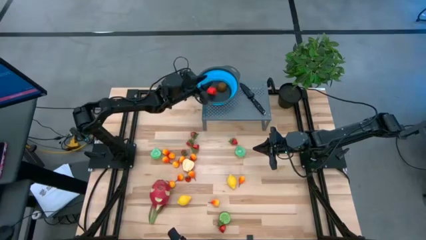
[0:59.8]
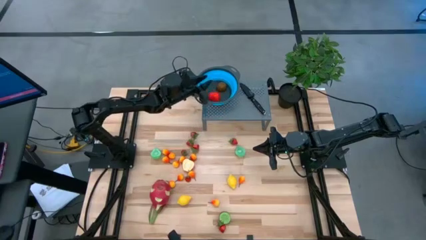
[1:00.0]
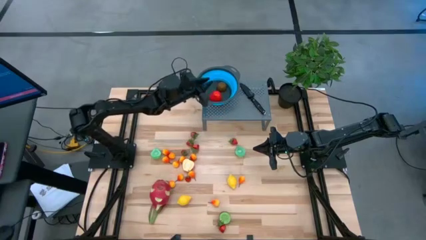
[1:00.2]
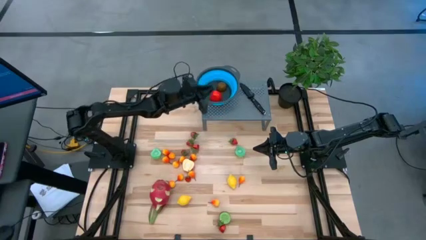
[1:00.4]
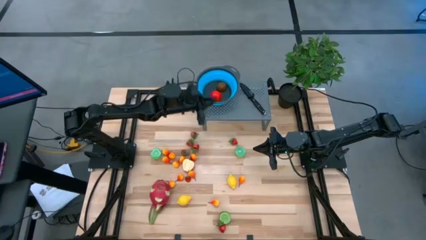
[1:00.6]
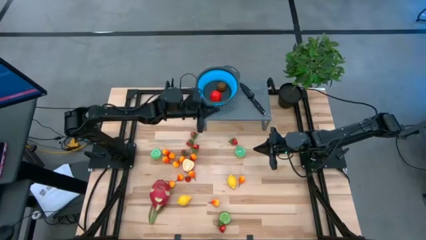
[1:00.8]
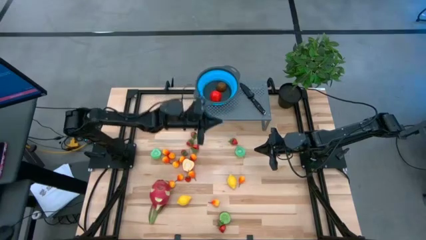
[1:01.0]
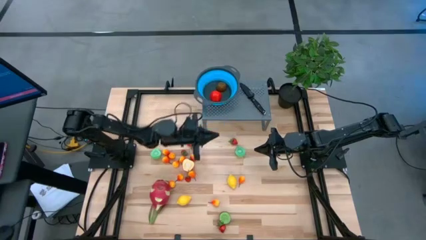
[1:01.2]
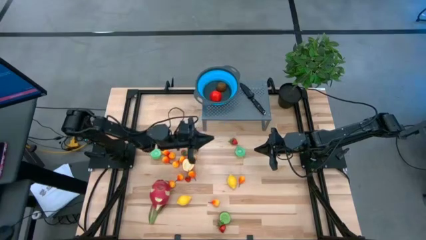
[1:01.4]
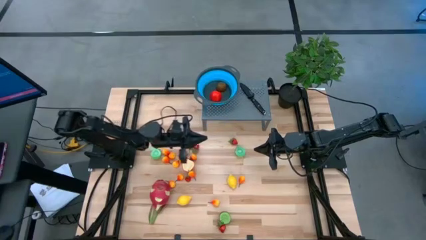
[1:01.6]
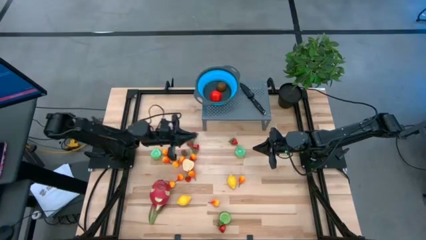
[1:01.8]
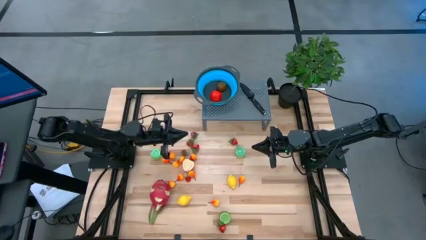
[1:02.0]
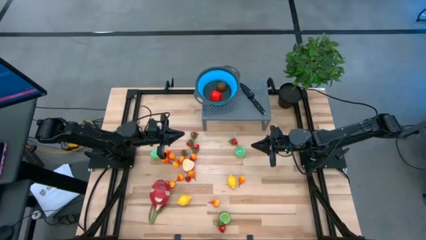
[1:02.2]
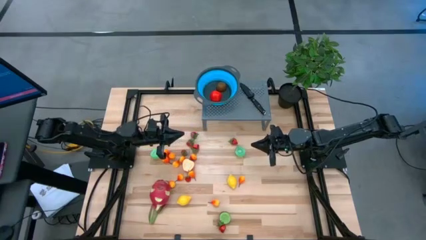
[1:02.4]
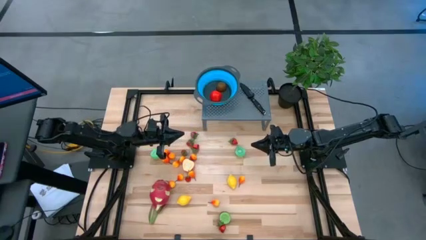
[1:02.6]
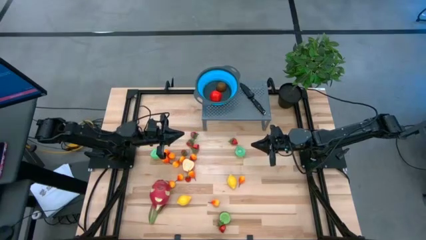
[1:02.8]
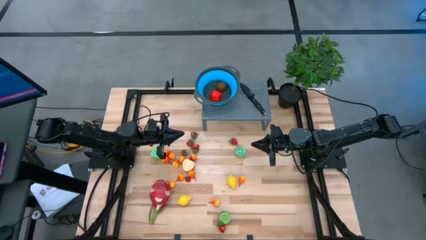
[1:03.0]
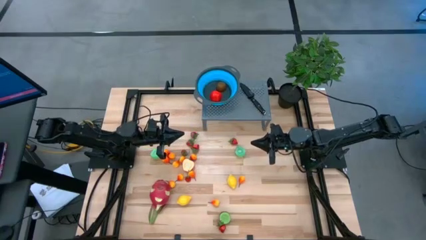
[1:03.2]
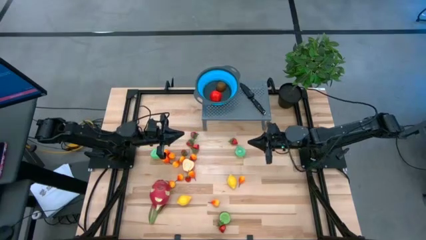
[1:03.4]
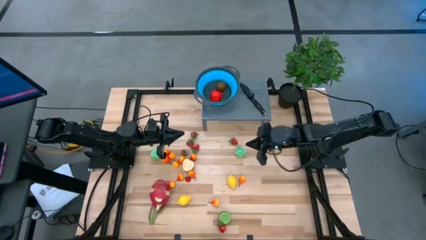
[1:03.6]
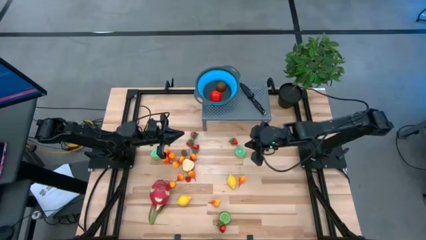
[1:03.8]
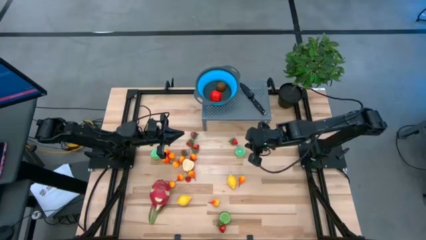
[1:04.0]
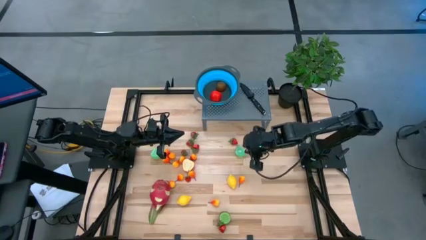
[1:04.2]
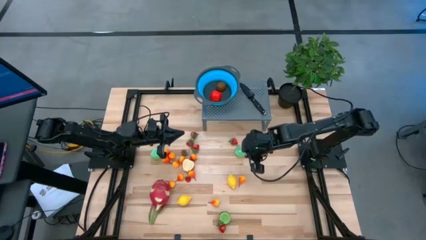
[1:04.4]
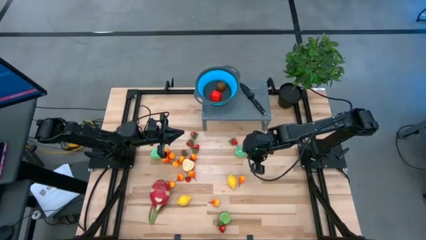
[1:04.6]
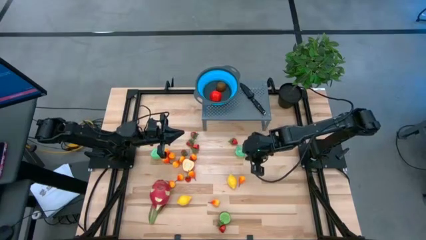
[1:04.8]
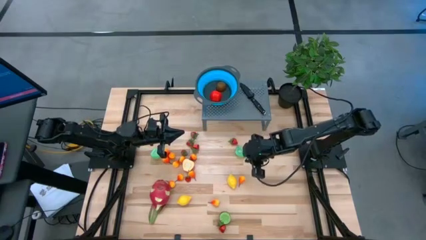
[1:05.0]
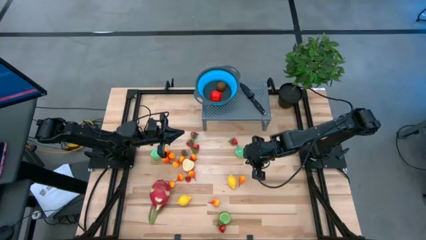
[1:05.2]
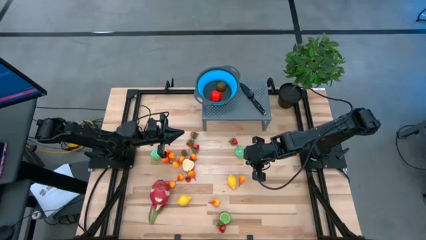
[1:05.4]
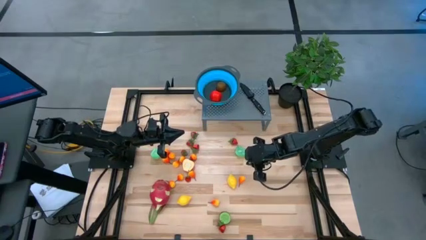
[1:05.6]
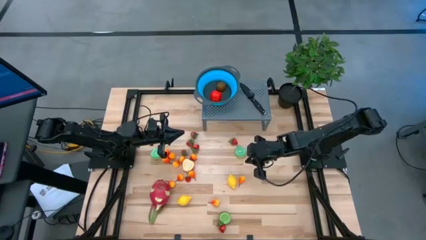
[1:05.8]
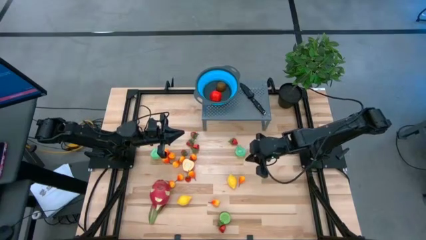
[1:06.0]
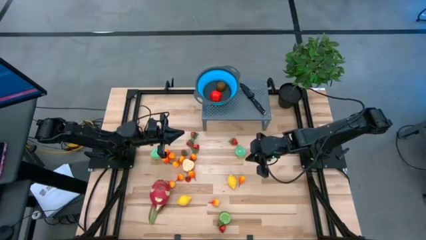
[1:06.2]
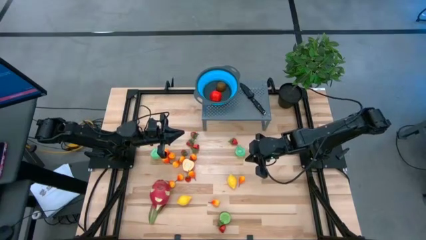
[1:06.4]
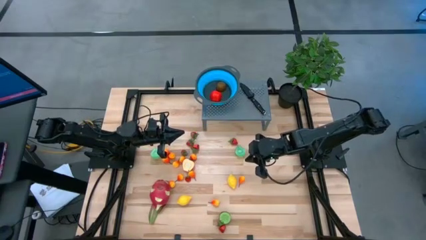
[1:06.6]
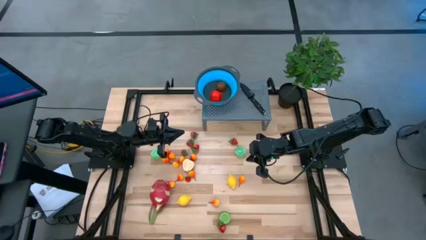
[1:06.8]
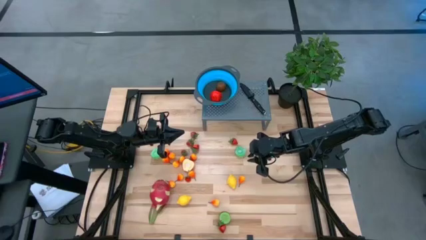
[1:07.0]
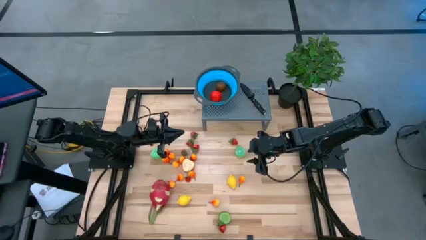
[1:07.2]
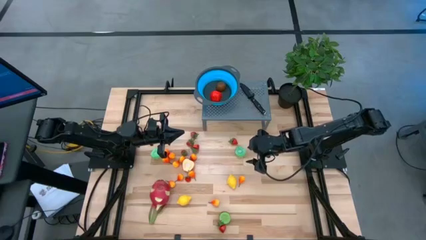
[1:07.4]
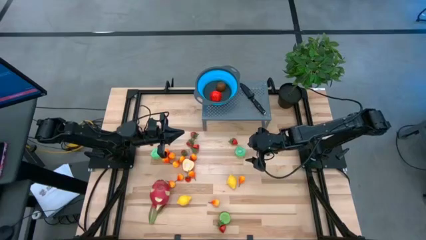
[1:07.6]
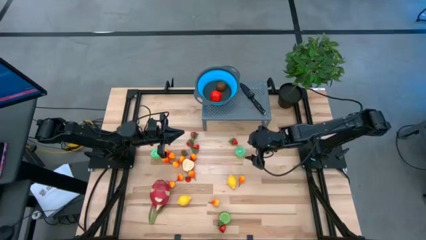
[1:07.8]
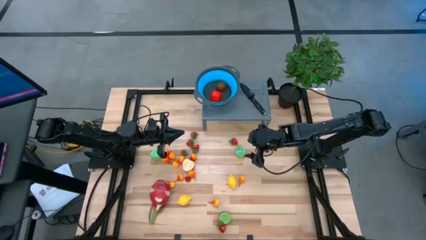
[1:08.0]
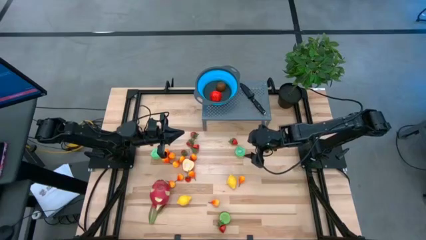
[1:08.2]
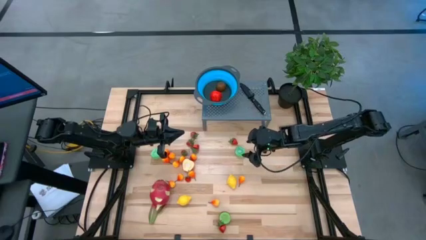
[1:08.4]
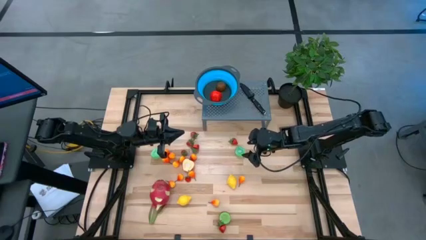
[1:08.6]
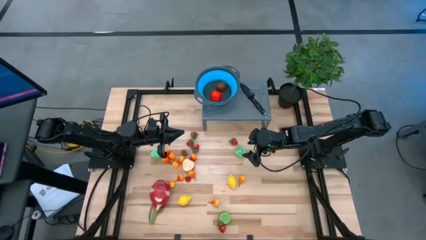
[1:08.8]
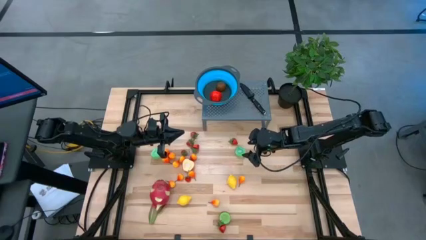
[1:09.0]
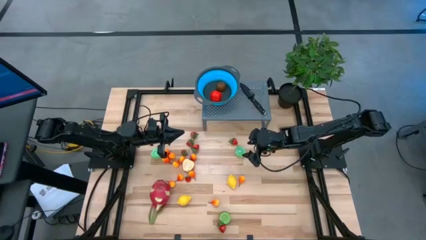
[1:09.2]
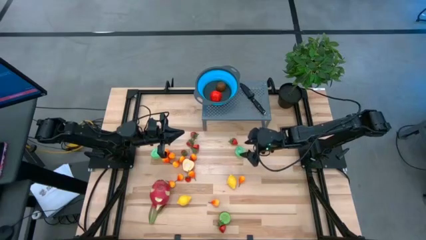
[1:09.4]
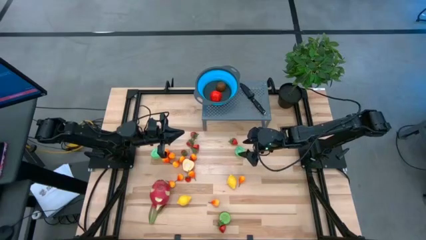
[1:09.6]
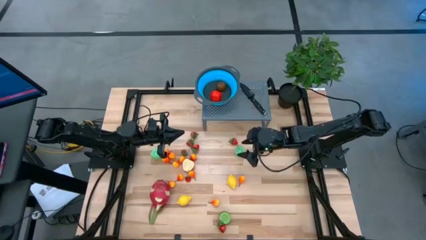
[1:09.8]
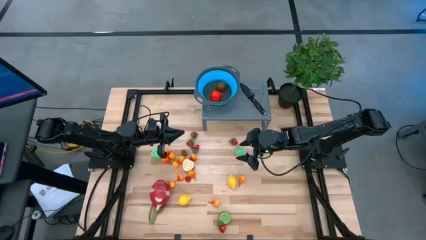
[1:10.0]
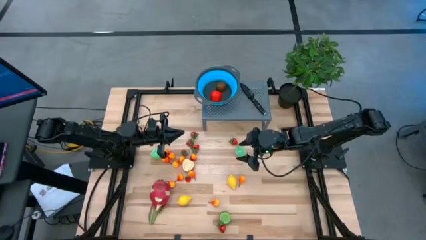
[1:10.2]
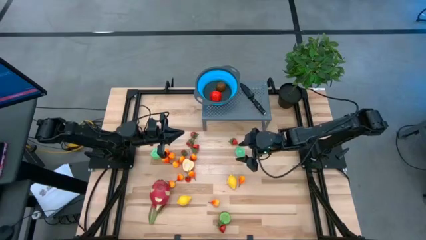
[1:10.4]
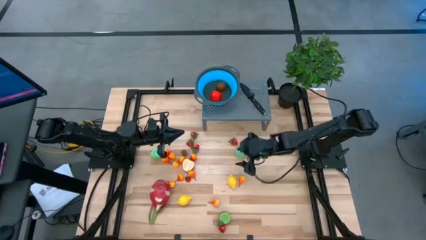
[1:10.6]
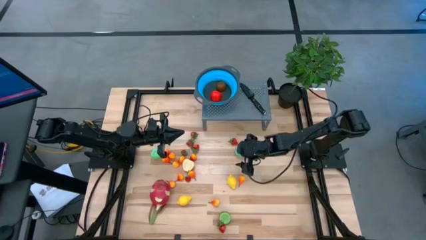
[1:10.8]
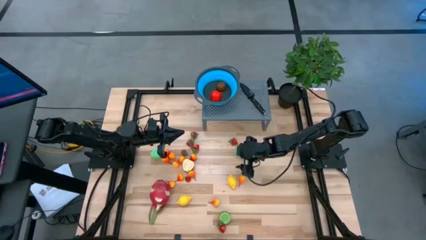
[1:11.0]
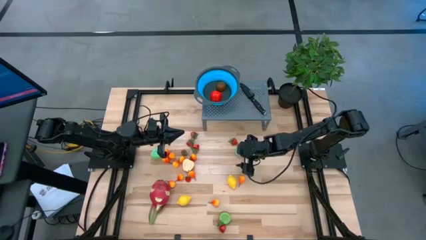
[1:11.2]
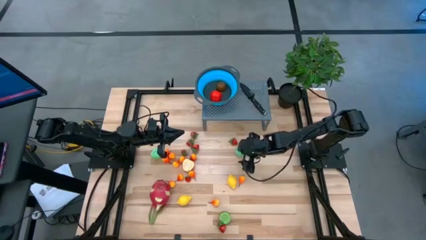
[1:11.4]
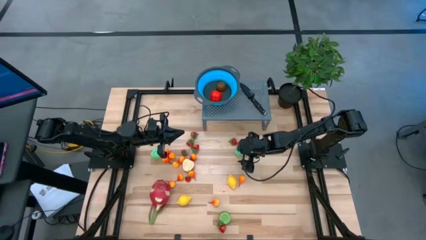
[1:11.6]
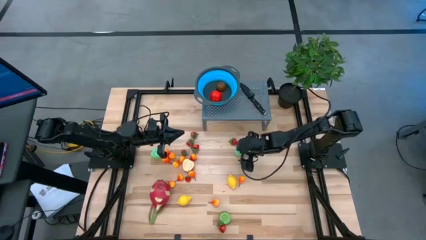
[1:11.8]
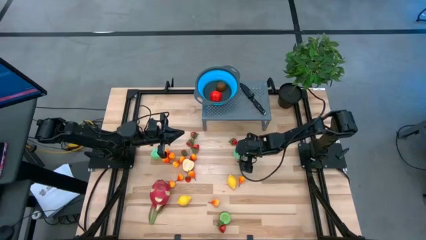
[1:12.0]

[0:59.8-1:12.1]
Task: Pick & Place Fruit
Put the right green pear into the strainer bowl

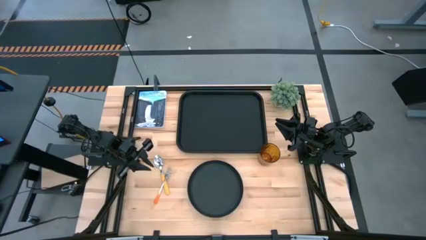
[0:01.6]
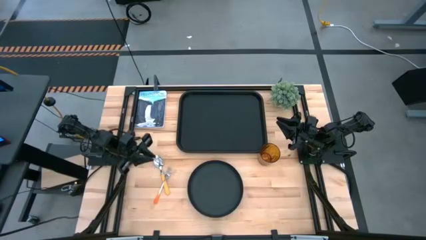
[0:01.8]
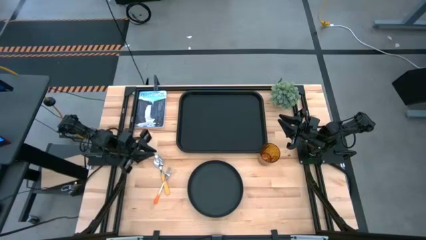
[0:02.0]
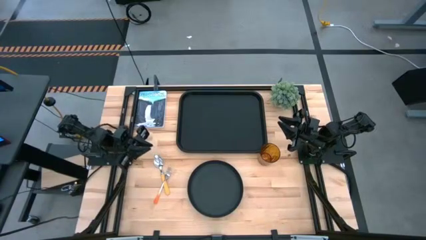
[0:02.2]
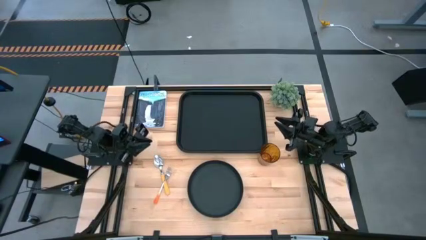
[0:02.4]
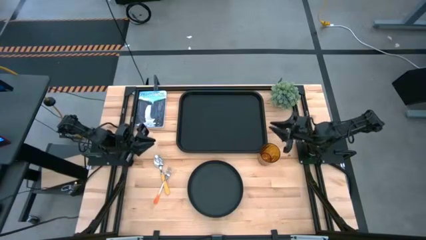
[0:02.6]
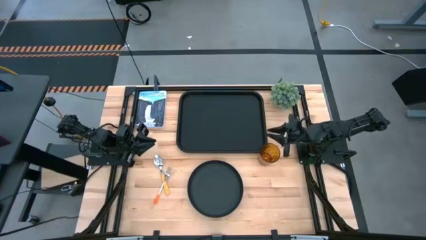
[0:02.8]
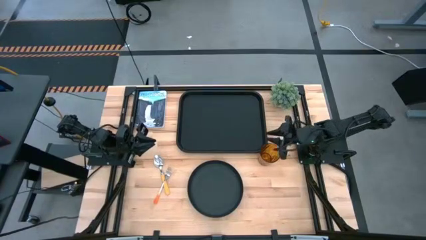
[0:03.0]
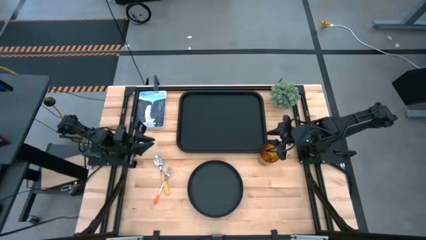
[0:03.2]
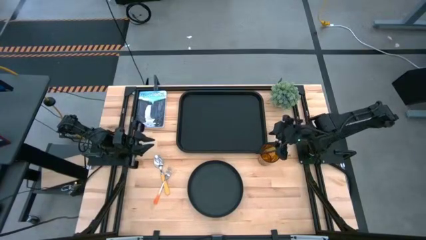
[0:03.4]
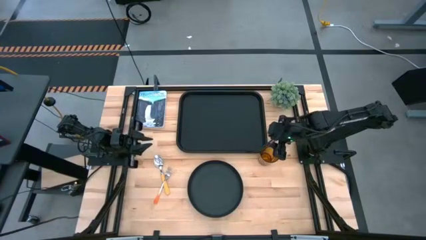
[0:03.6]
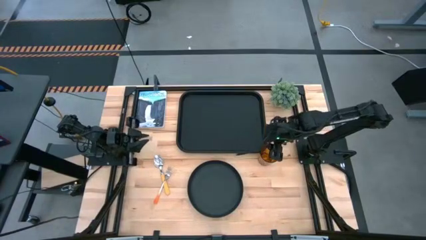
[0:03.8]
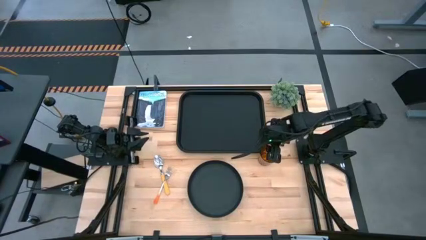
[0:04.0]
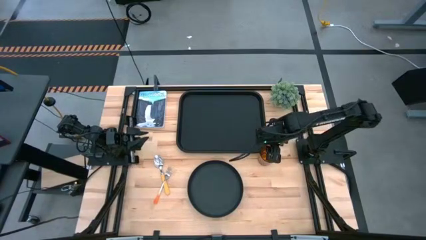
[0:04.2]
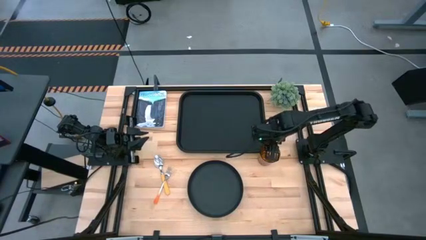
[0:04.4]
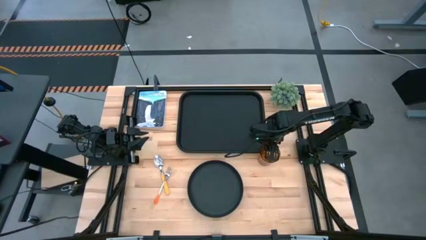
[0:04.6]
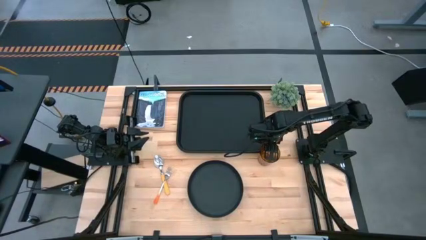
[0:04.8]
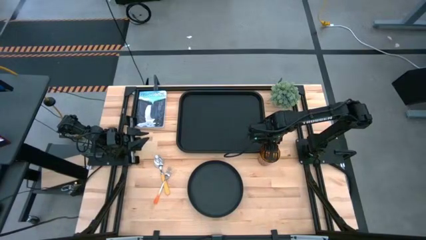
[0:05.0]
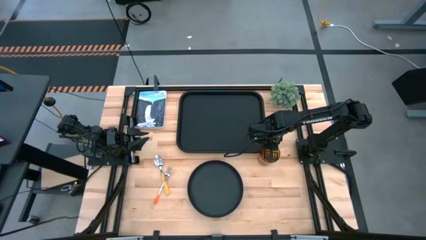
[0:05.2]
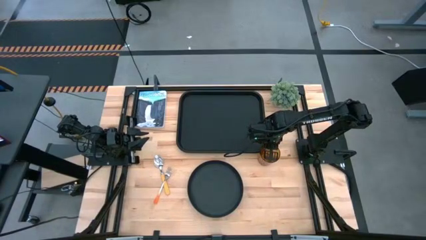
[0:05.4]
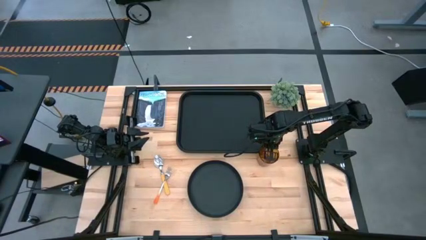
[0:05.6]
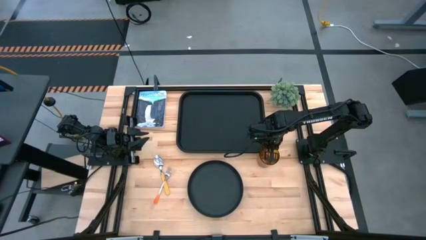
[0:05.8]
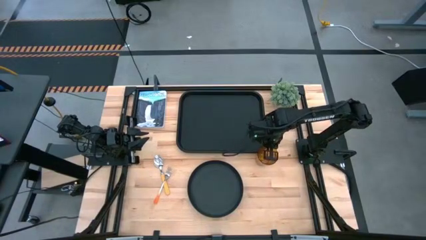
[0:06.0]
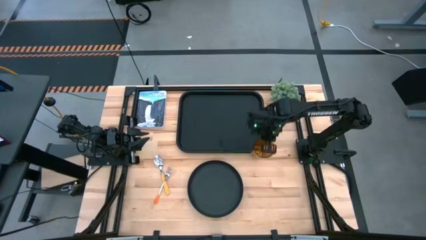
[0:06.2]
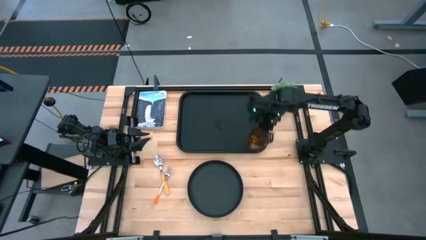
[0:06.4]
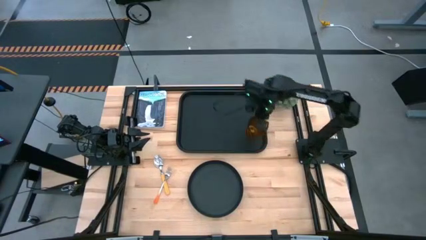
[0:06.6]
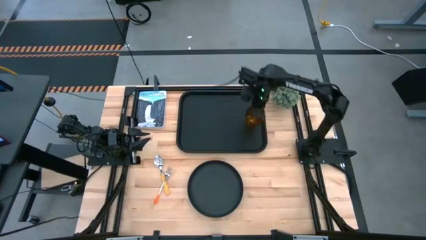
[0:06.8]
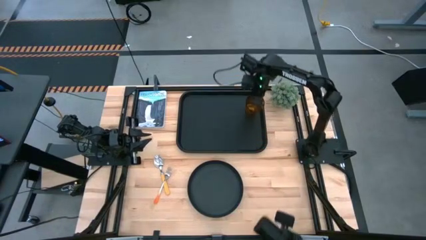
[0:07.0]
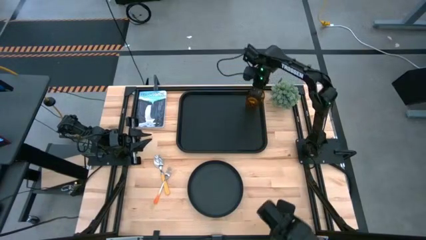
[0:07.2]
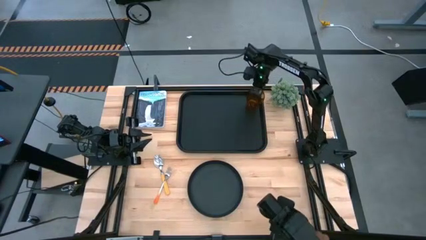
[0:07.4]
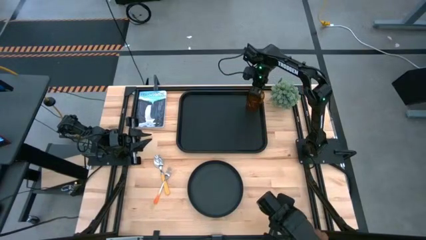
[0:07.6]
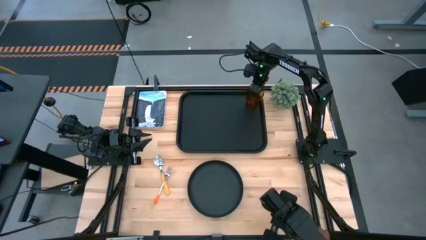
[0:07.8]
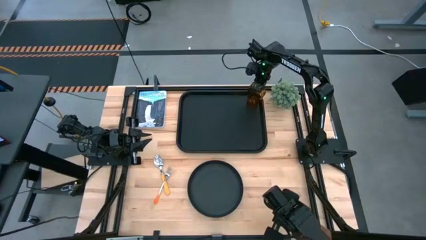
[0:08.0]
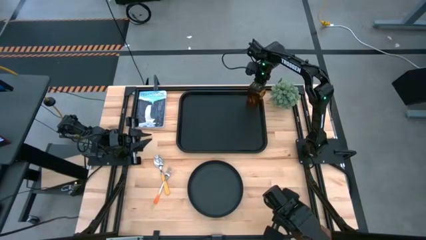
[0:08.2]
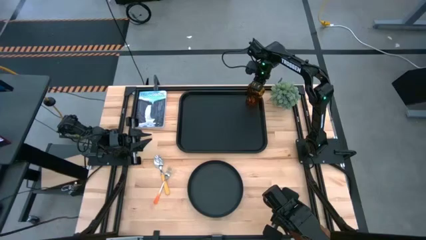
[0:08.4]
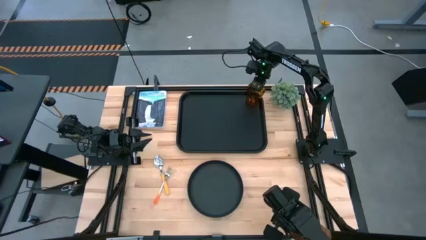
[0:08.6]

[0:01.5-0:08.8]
Task: Pick and place plate/cup/fork/spoon on tray
Put the brown cup on the top right of the black tray
